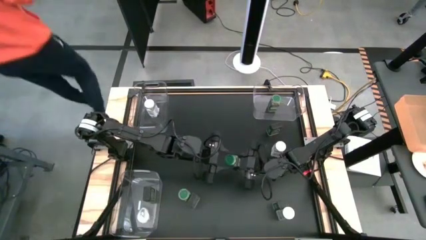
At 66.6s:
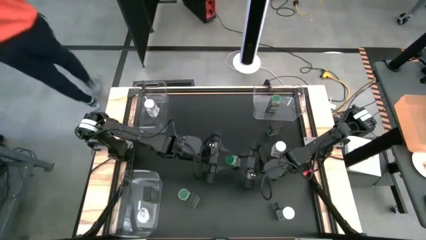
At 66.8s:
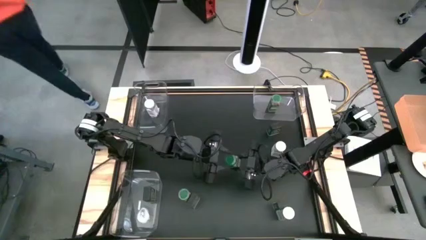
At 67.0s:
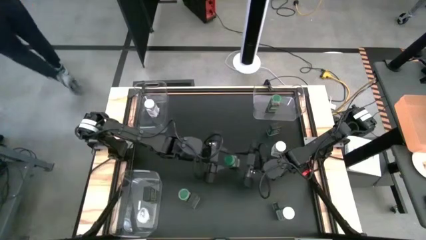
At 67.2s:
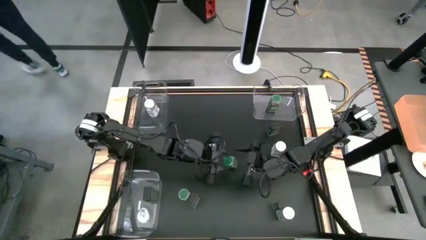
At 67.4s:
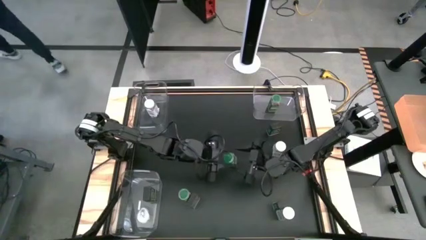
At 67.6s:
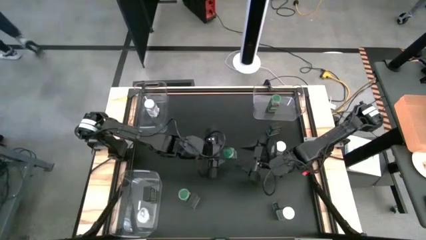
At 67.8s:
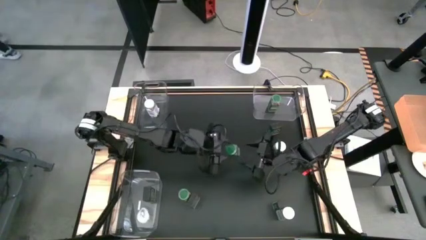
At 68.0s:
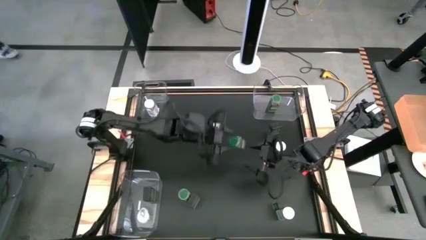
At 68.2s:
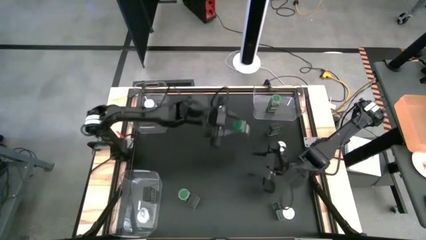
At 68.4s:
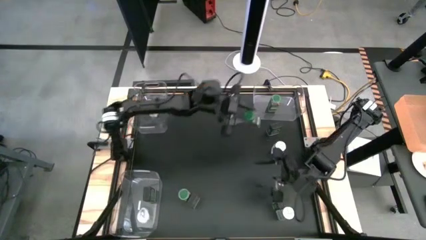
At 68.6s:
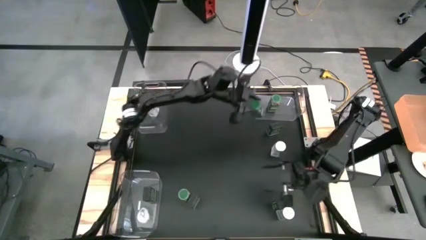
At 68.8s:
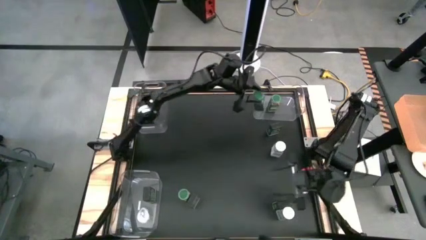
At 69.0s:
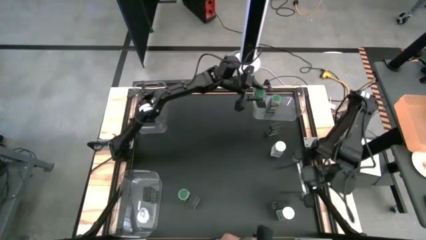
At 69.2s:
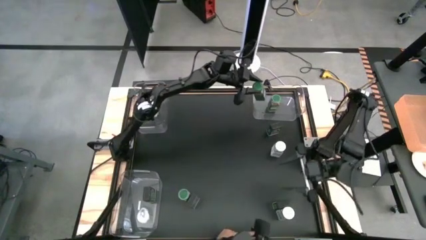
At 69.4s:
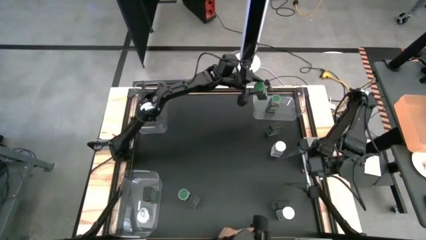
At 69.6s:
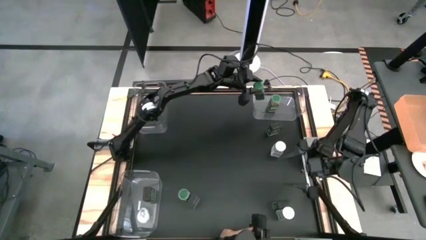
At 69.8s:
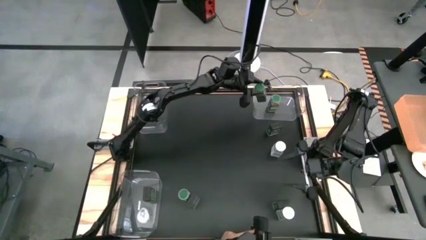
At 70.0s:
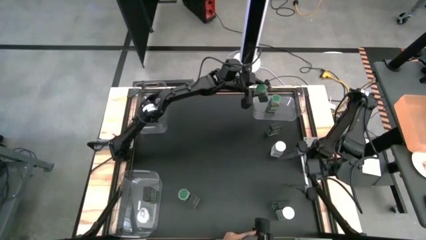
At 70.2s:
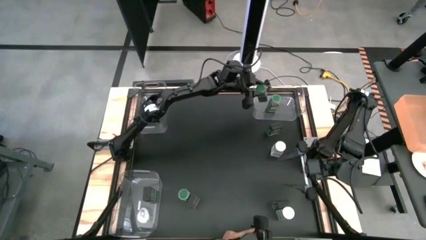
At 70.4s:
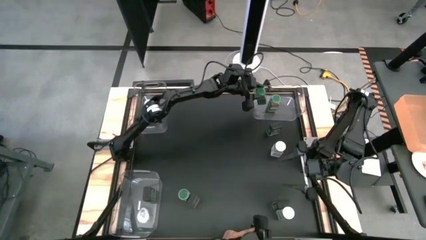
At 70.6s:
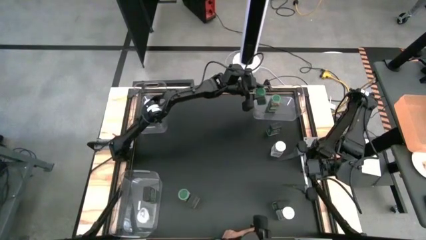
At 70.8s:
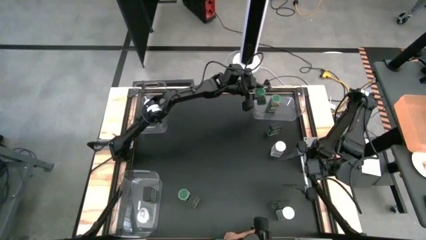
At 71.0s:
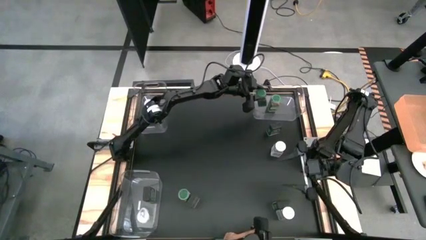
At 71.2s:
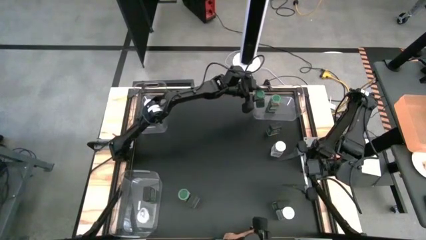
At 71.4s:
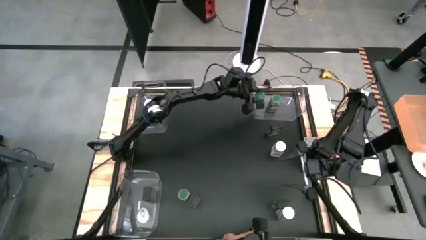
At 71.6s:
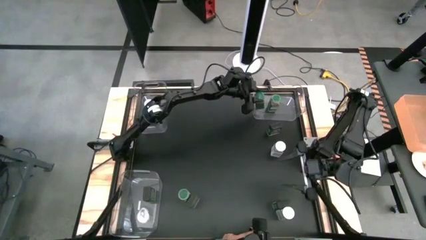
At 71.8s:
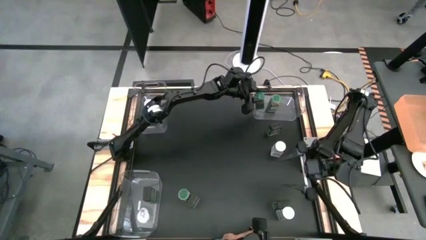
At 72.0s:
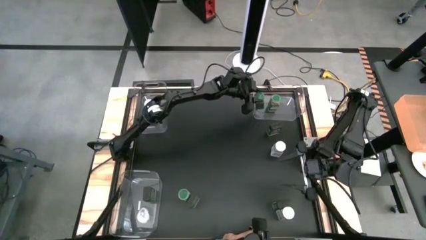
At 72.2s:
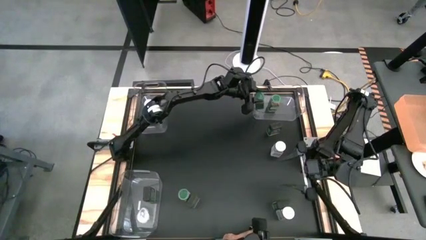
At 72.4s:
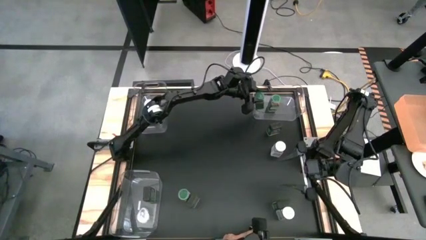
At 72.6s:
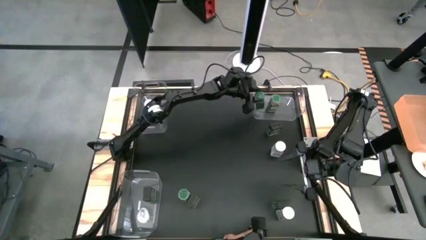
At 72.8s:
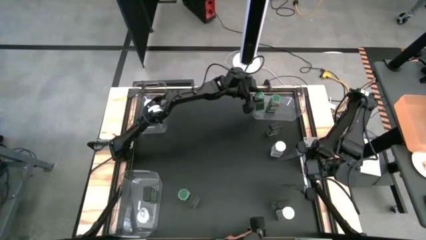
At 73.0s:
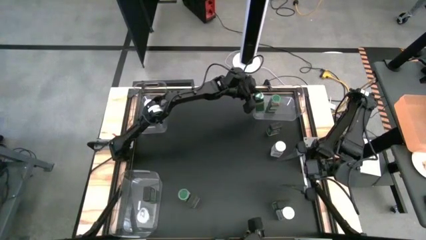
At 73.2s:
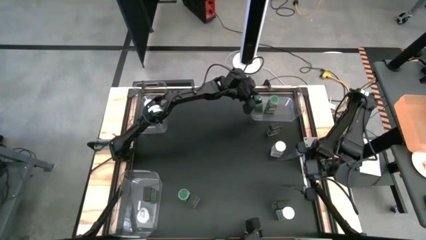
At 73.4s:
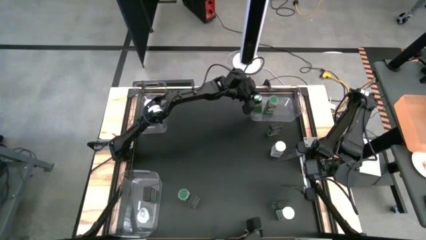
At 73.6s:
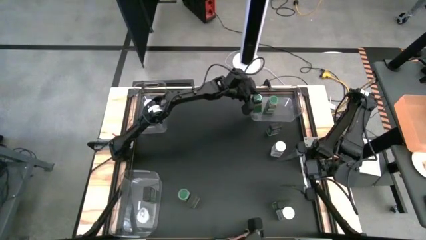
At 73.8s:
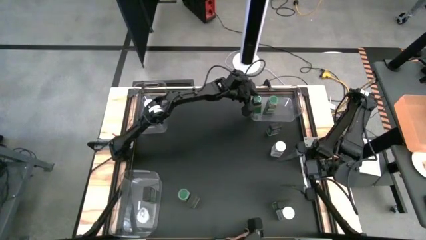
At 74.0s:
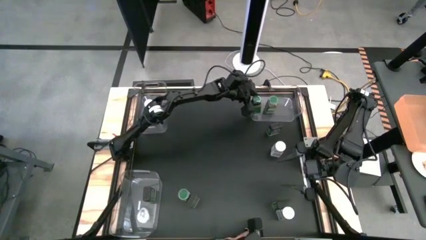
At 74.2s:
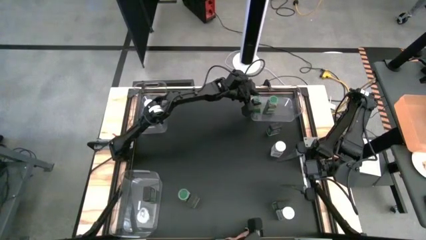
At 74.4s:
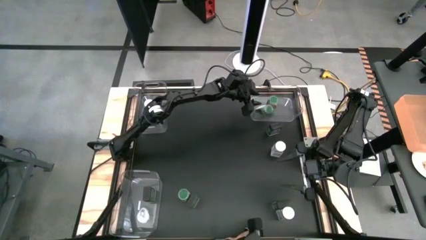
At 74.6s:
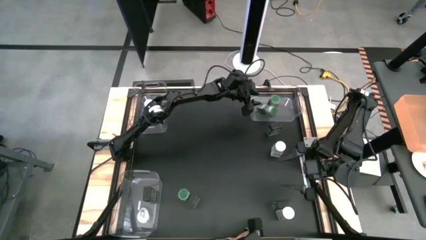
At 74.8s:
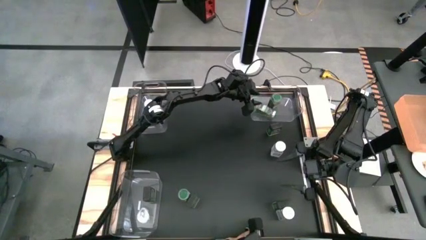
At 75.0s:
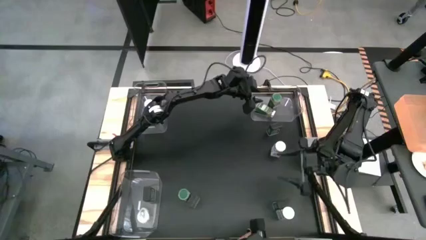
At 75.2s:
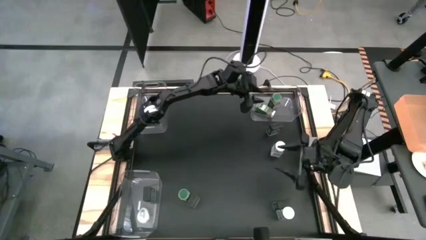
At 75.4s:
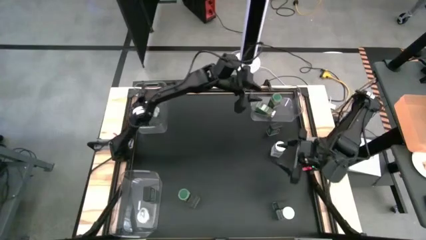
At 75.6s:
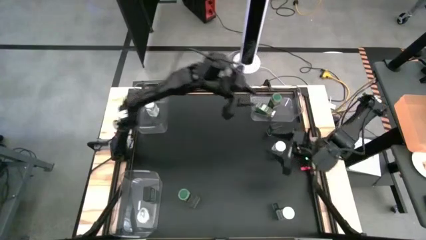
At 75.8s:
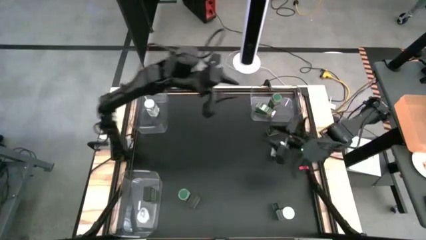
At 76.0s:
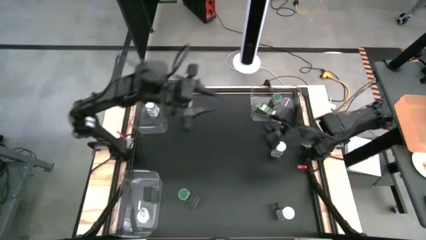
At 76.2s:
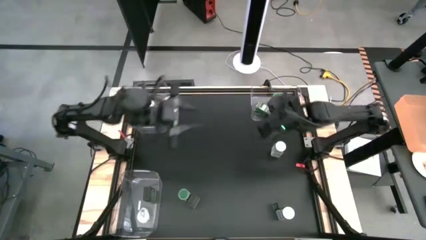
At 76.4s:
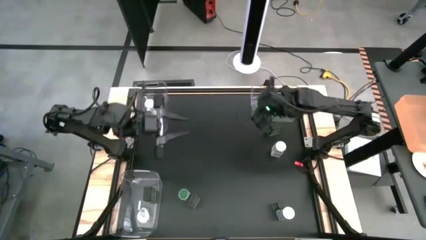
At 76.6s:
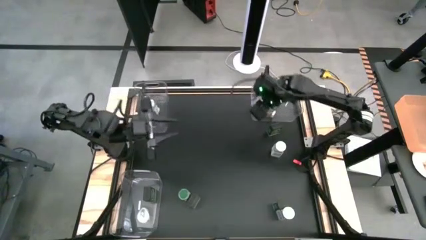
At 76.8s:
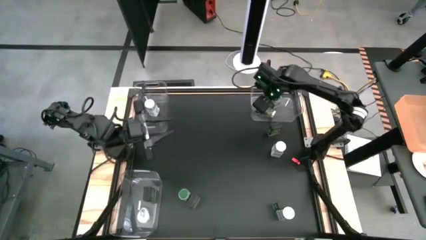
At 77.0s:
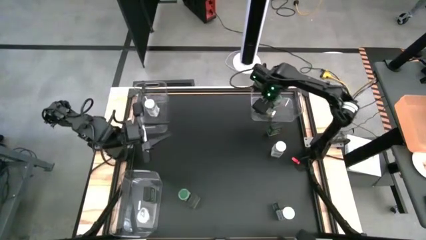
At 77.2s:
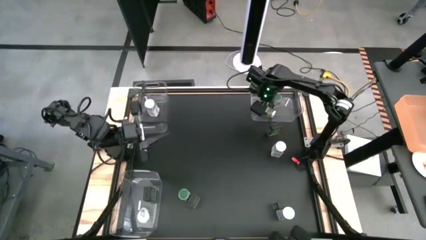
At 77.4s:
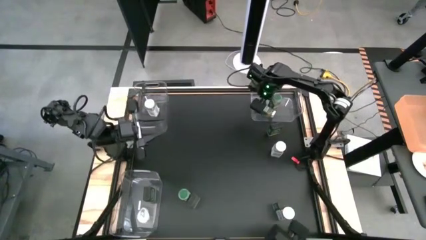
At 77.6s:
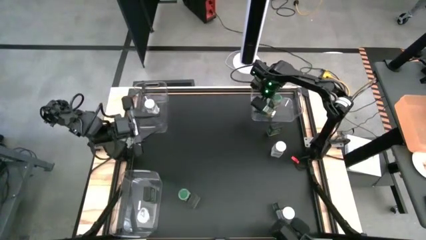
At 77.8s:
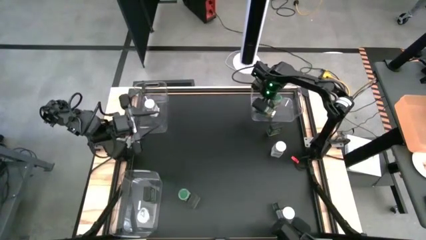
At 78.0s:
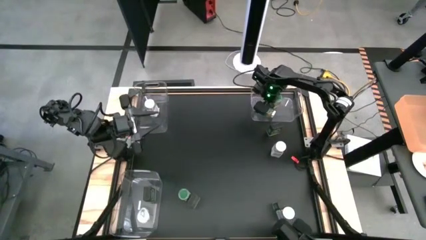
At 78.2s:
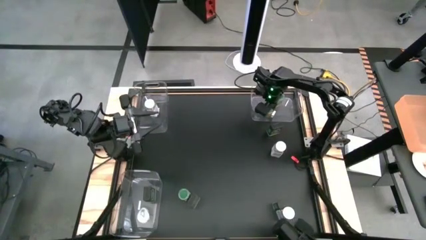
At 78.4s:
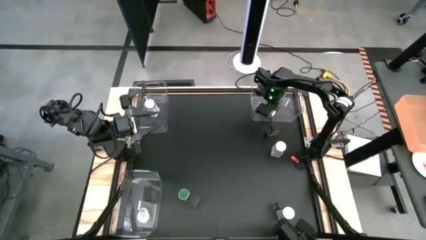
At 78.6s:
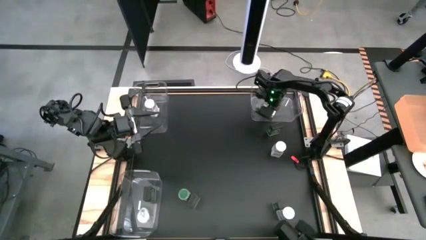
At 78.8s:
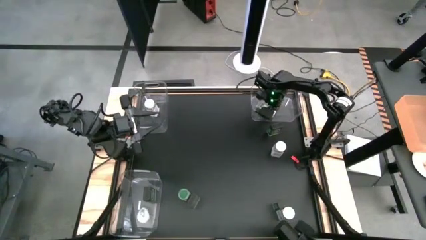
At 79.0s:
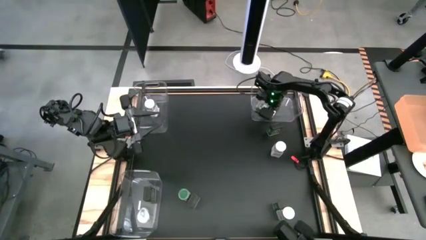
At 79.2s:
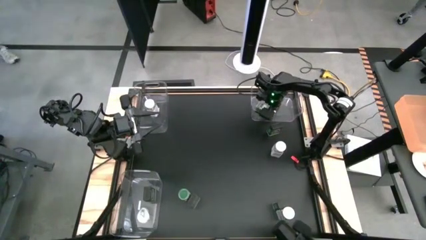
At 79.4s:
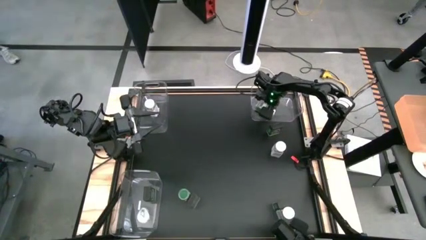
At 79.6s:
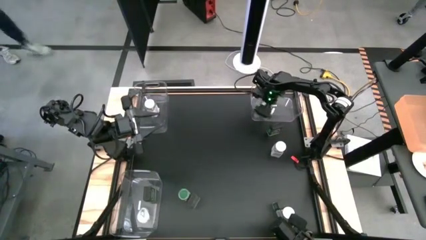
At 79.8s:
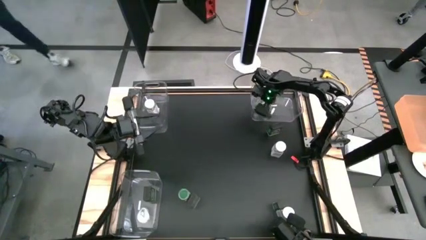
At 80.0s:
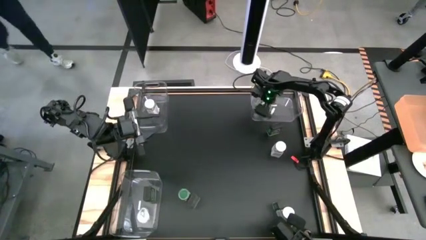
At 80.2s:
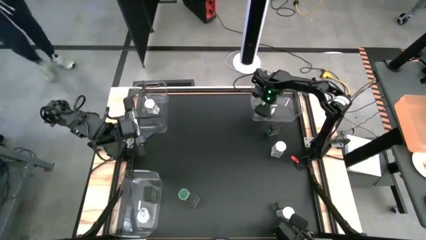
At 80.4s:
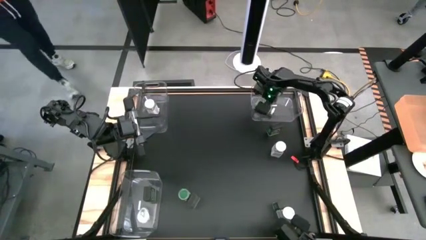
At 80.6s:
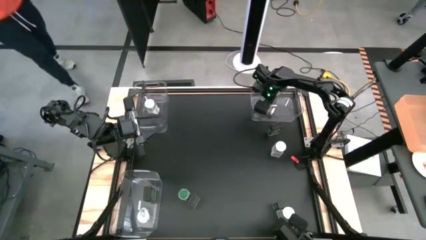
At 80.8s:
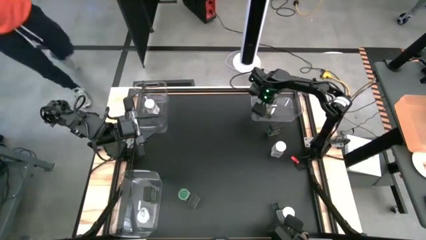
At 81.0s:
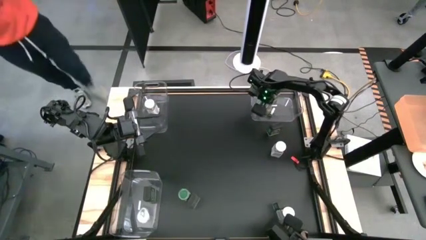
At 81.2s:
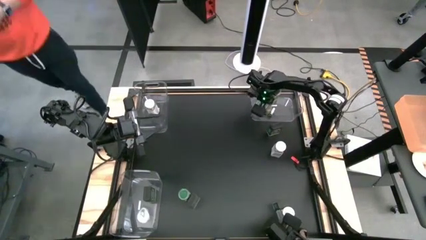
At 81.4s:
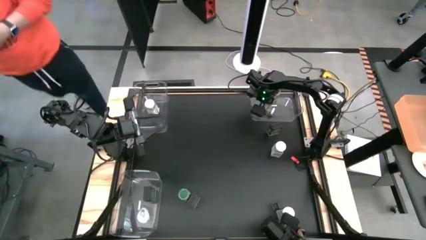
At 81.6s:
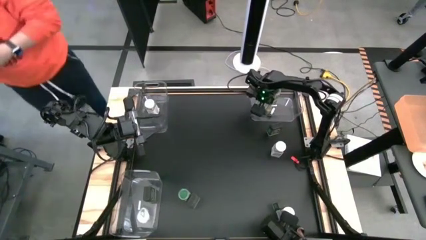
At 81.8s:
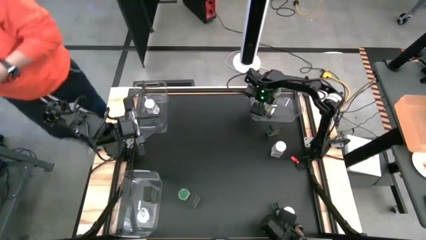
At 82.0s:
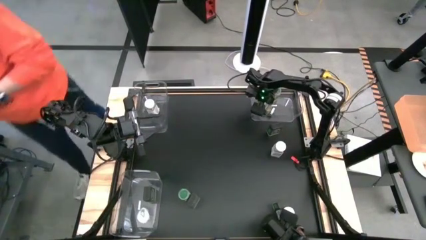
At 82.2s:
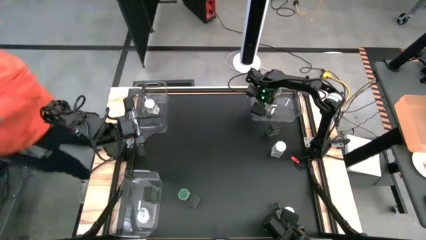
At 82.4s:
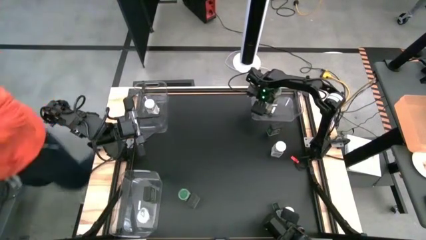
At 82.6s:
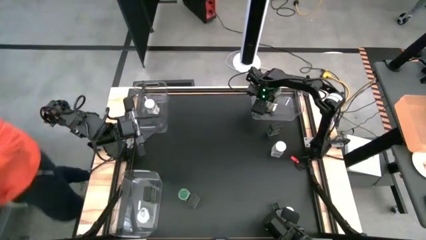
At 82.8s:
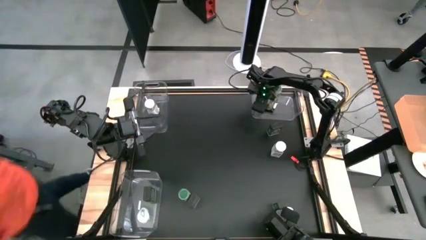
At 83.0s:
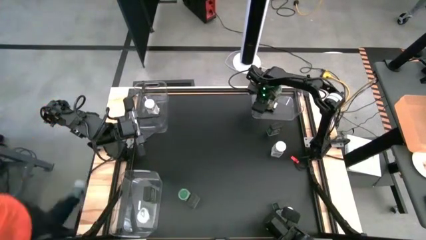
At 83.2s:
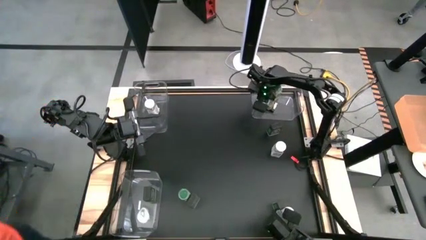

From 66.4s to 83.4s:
Task: Sort spices by type
Put the top green seasoning bottle into the top right transparent bin
